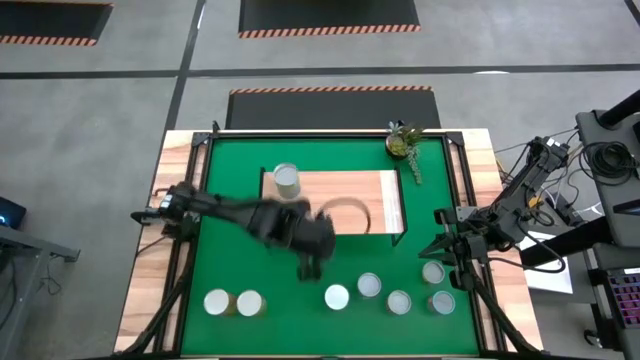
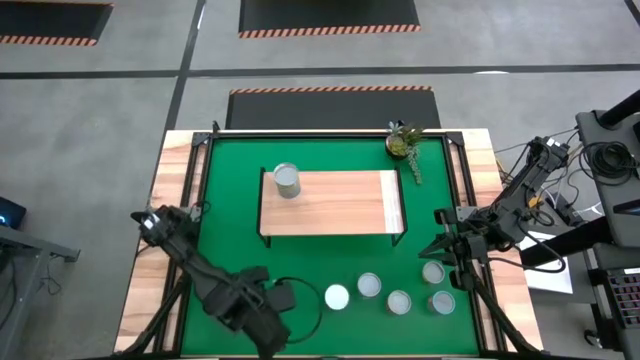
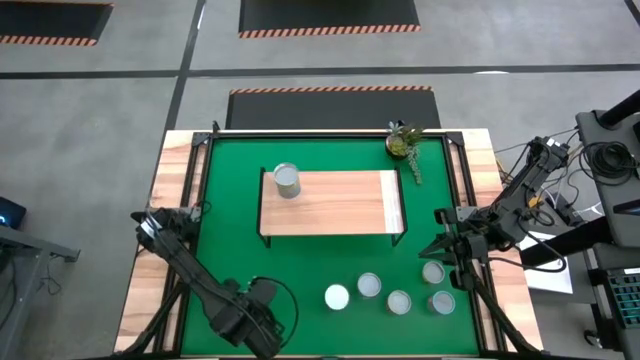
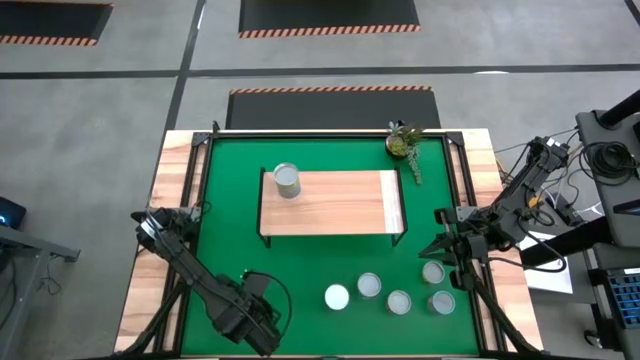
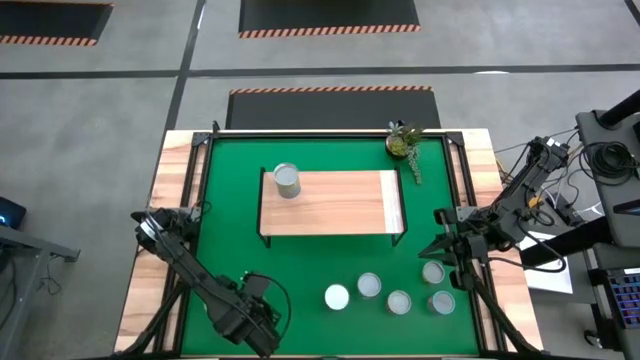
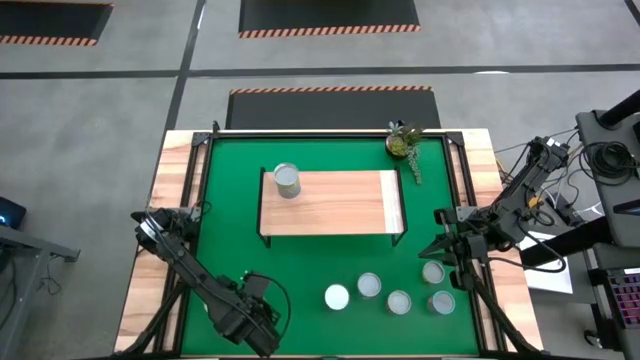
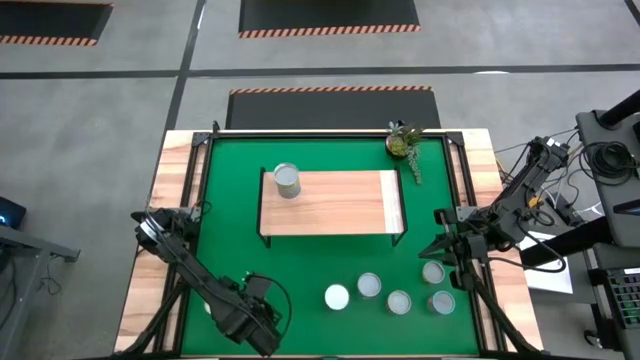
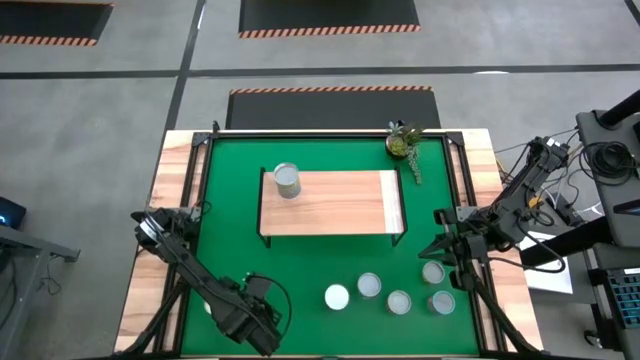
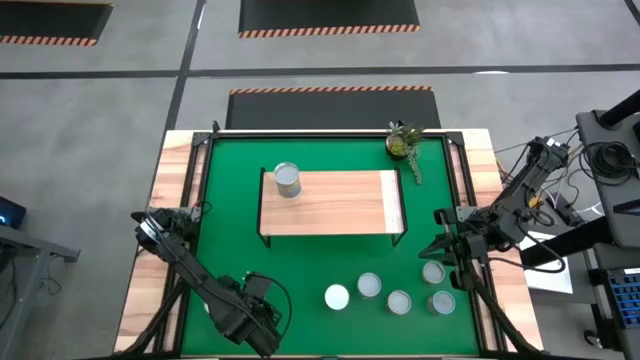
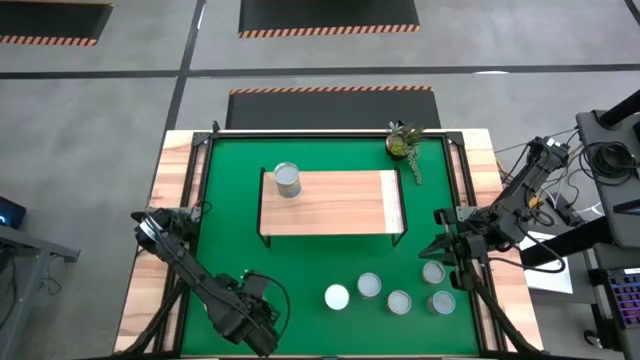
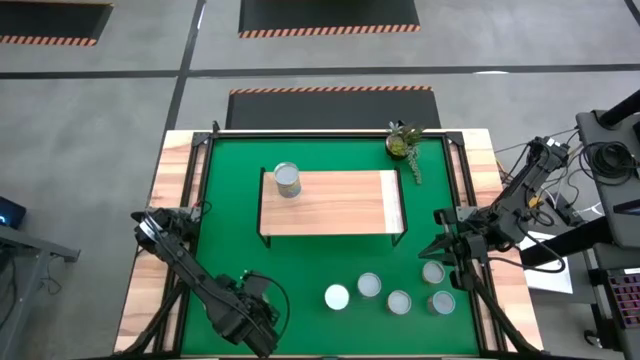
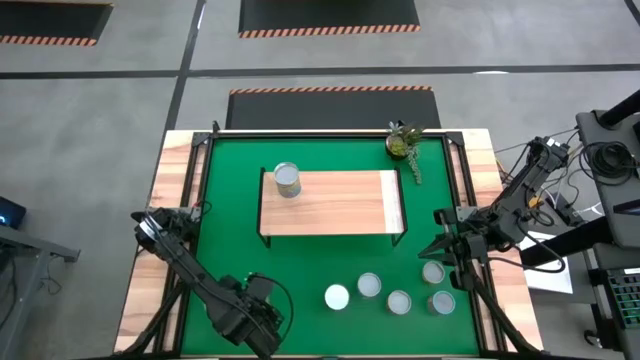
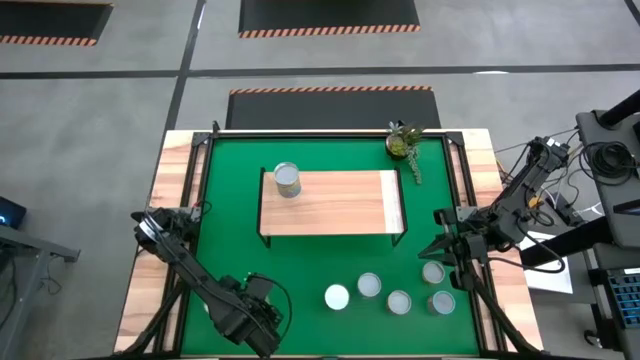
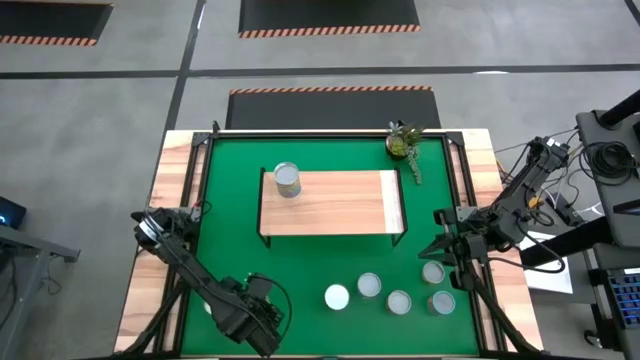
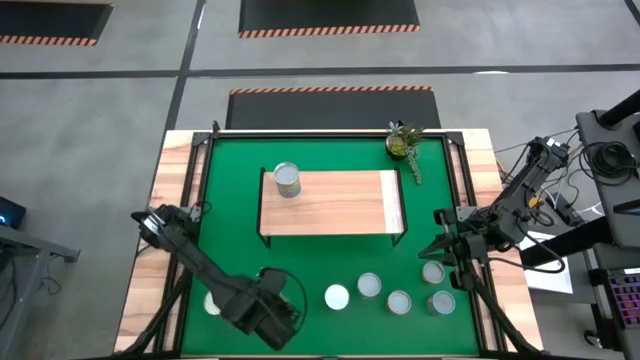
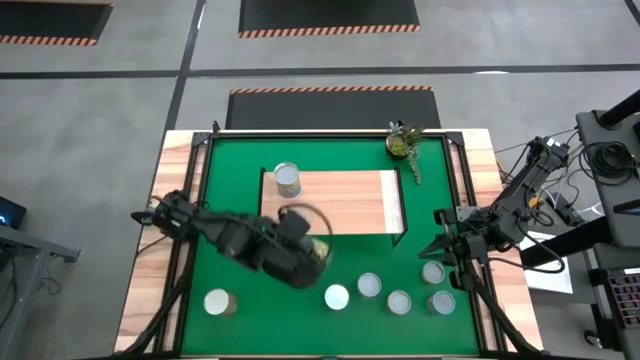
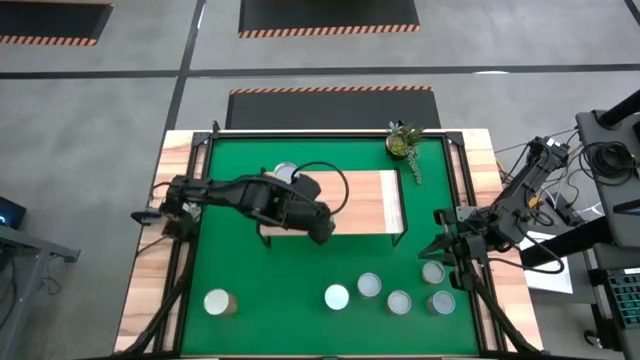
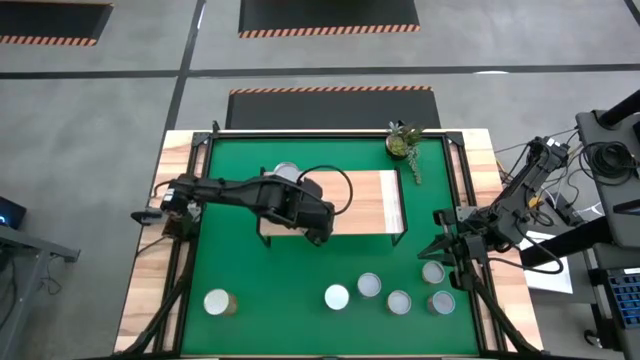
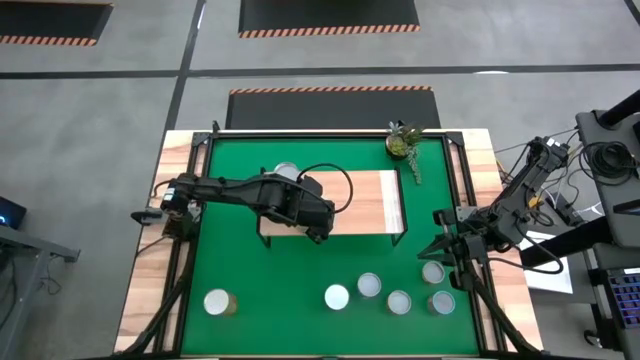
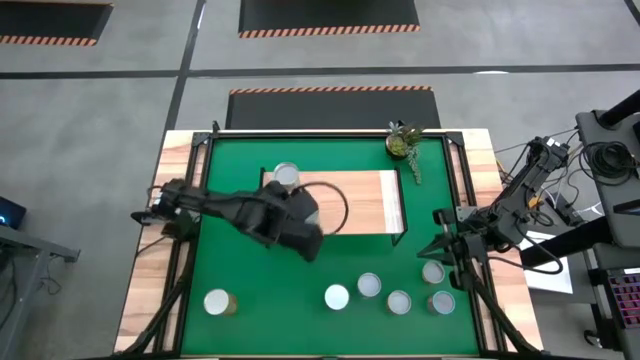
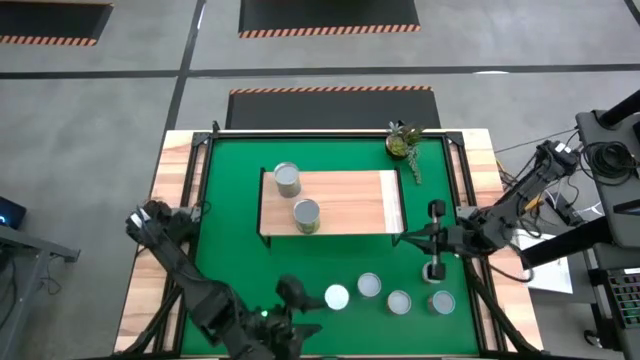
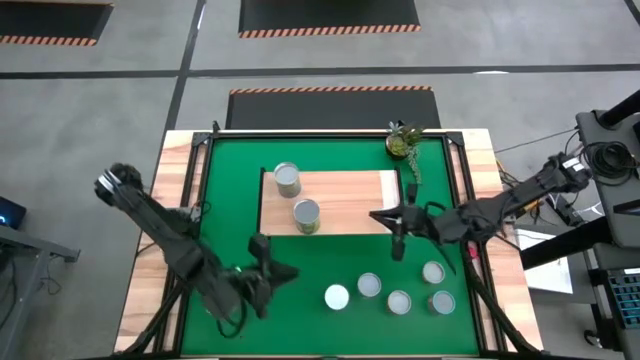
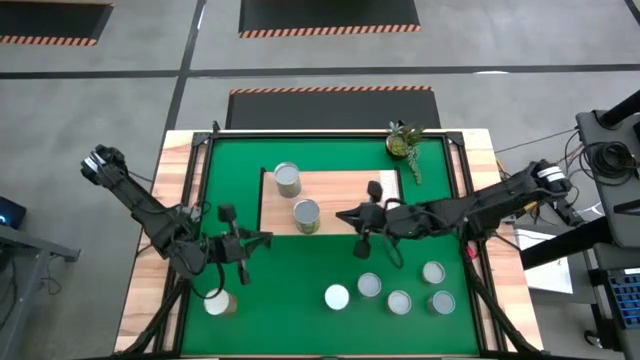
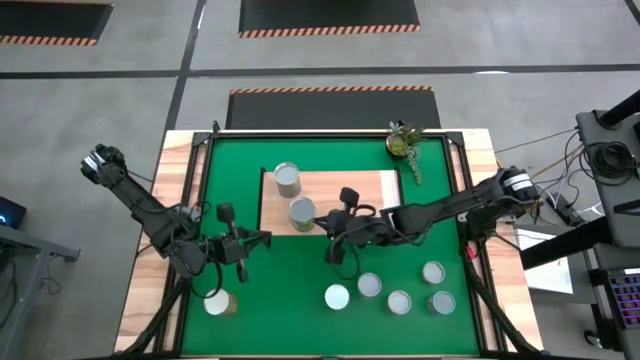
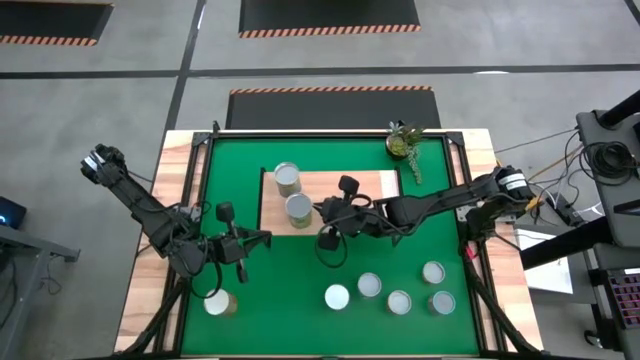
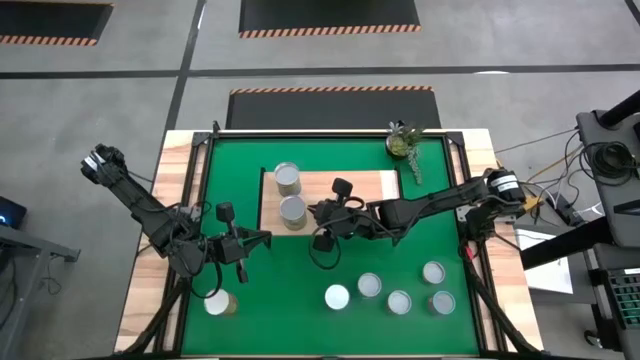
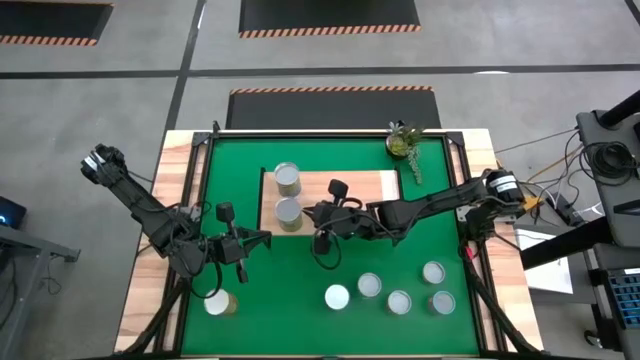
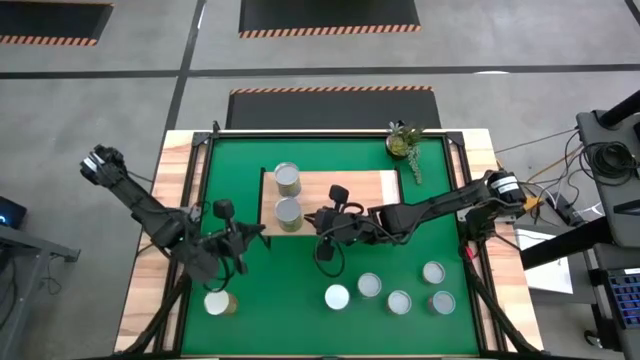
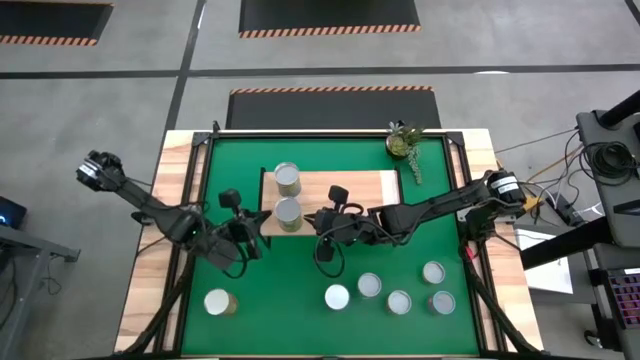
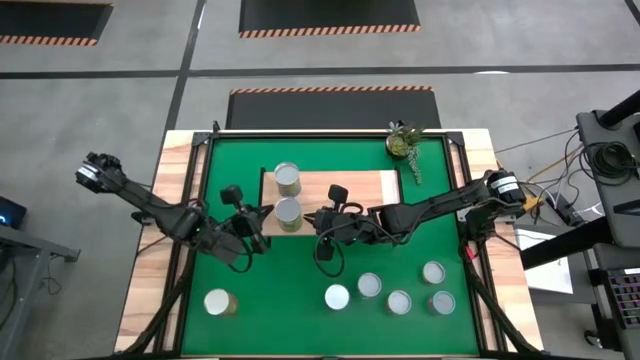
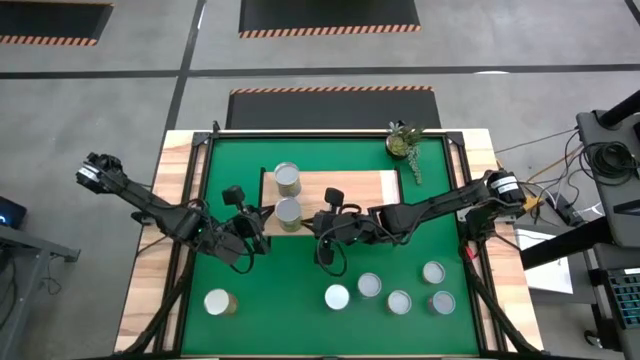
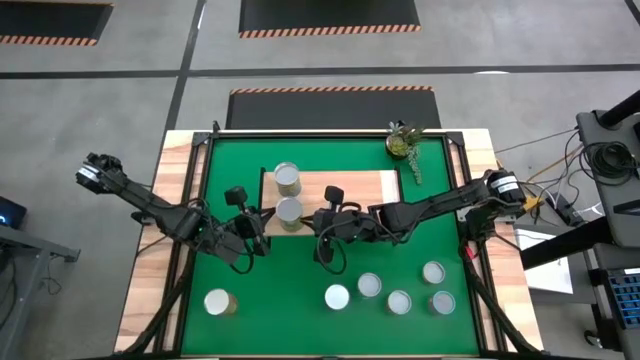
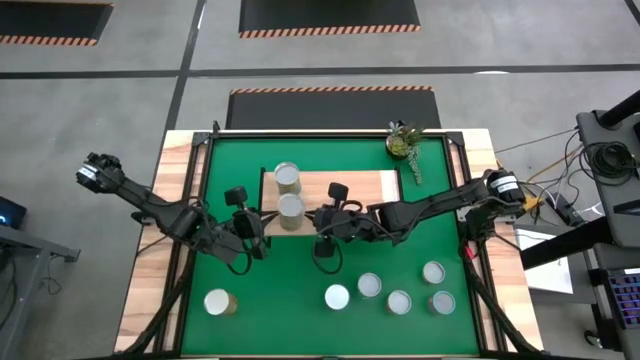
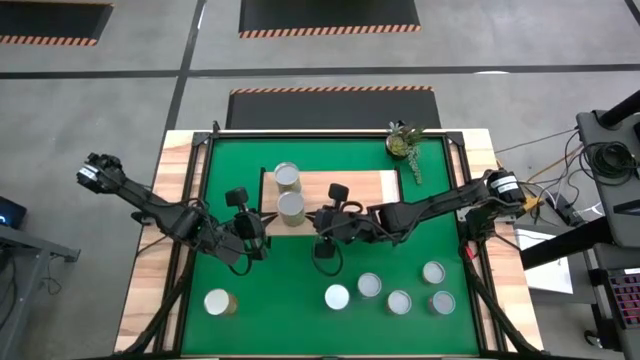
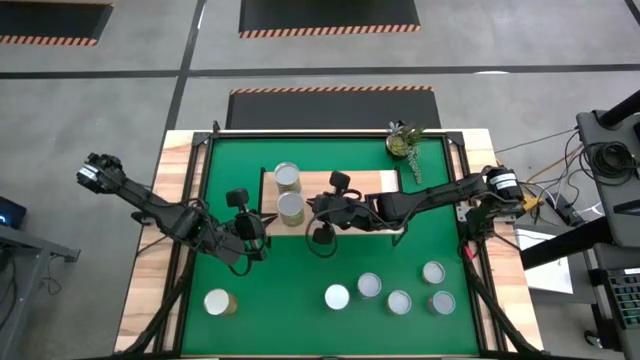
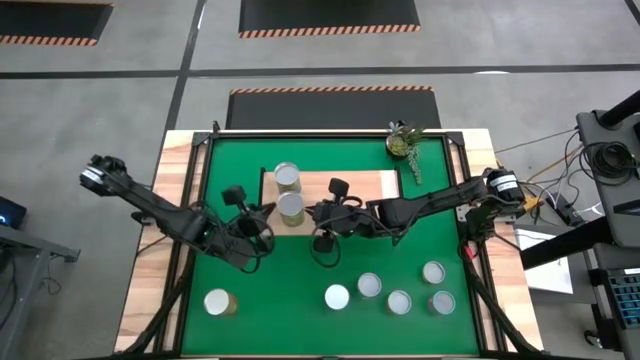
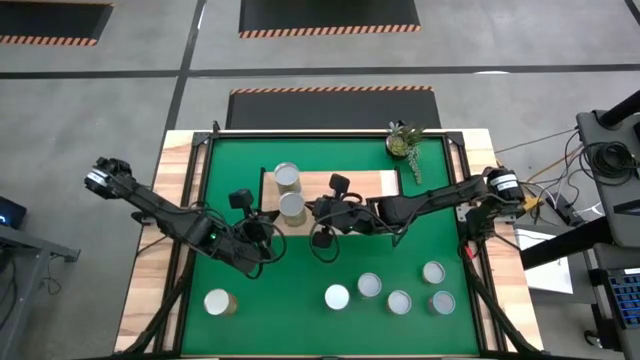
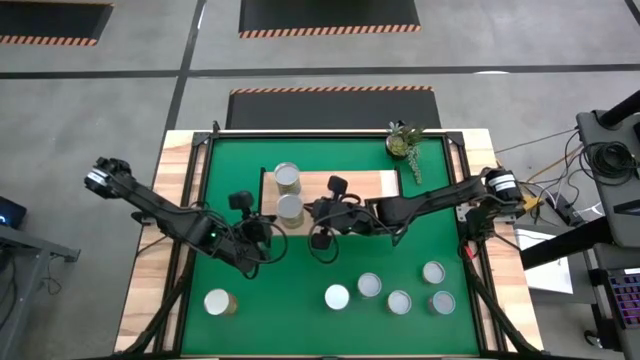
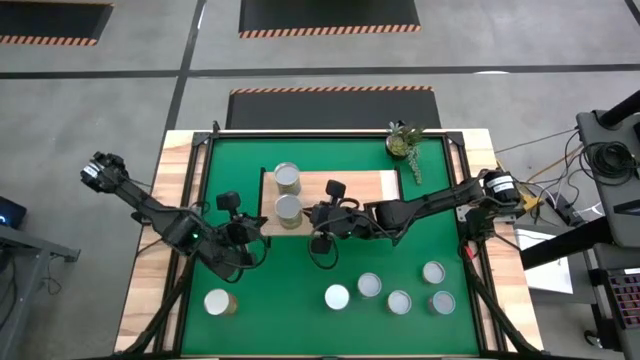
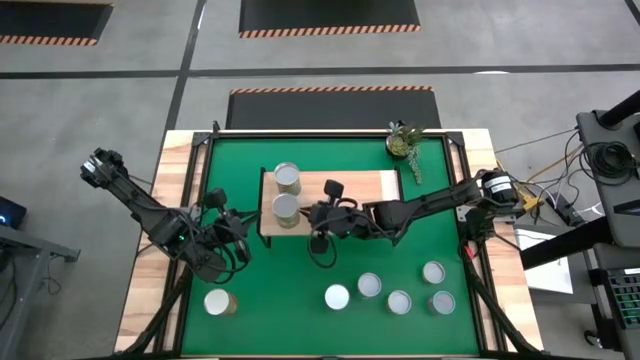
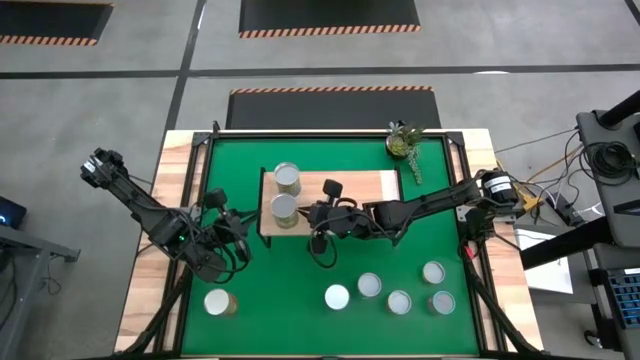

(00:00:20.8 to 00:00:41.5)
Task: Pick and place cans onto a shelf
Put the canned pears on the shelf

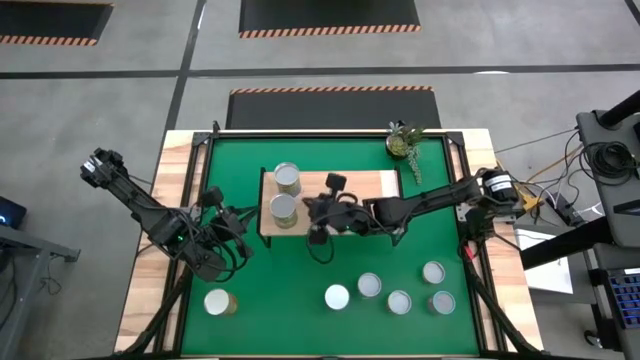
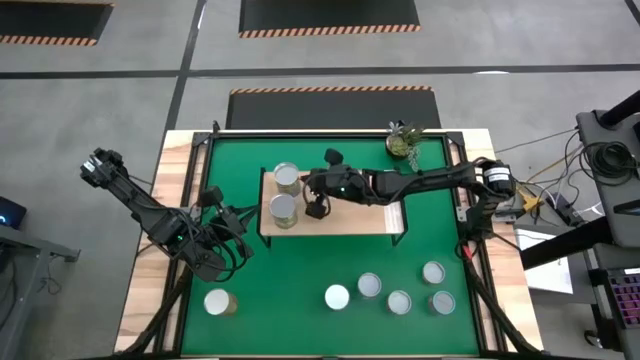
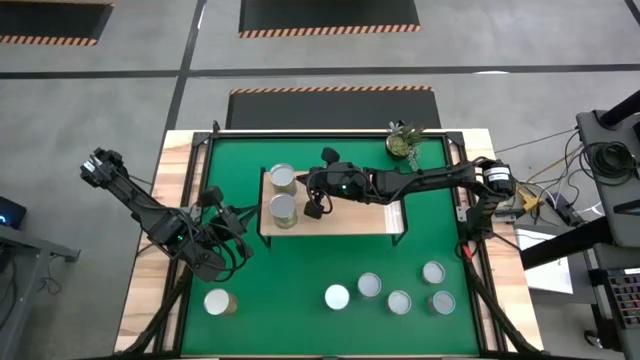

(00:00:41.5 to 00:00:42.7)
Adjust the canned cherries on the shelf
